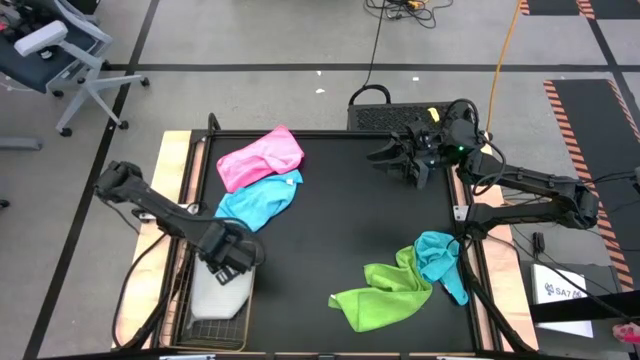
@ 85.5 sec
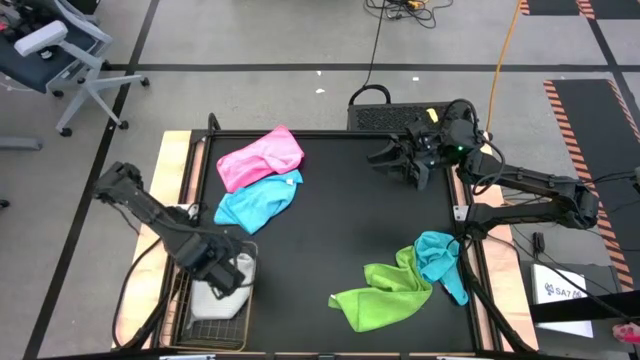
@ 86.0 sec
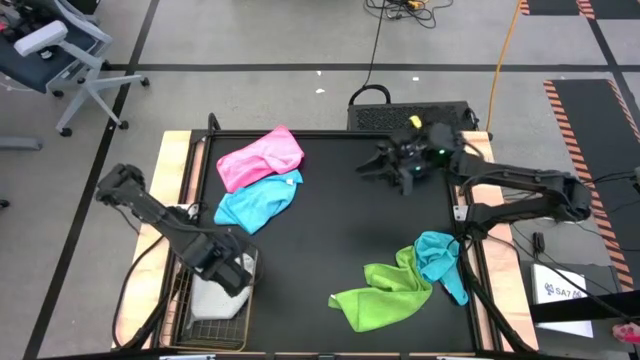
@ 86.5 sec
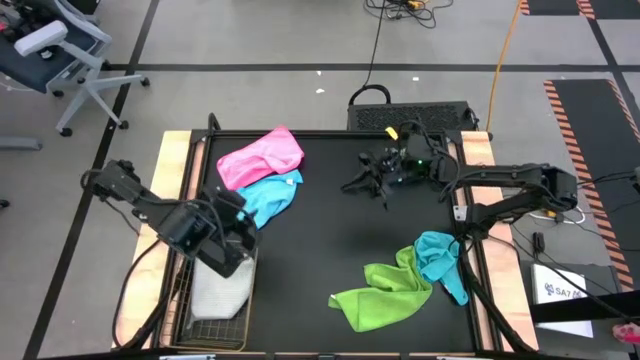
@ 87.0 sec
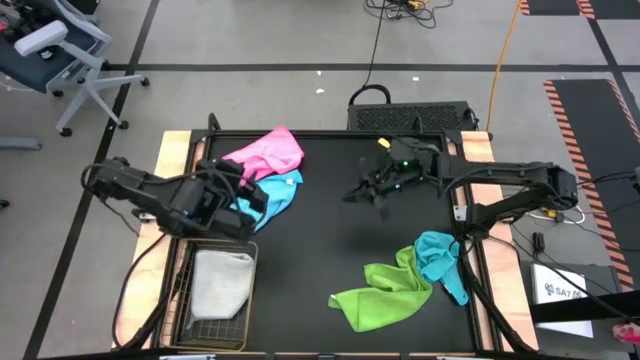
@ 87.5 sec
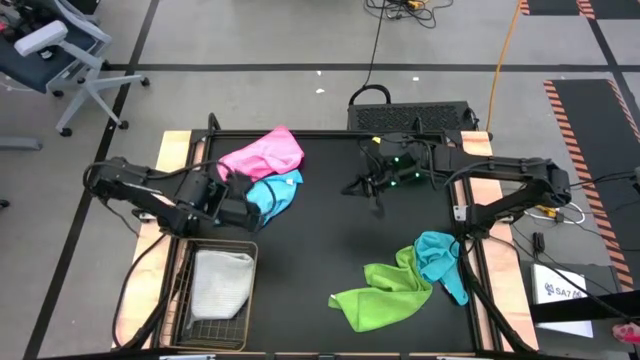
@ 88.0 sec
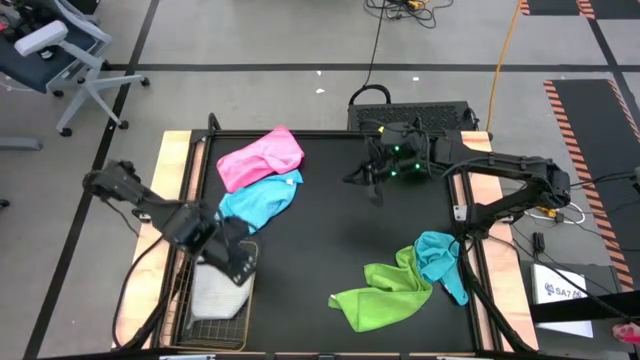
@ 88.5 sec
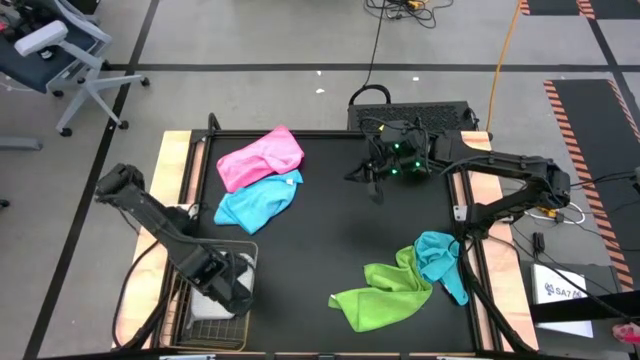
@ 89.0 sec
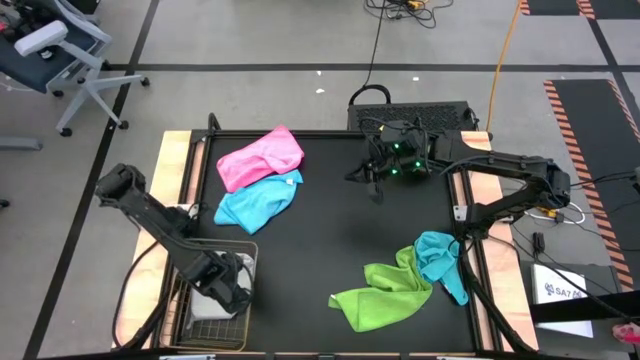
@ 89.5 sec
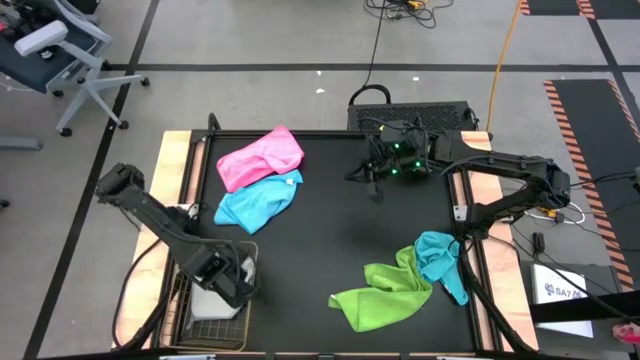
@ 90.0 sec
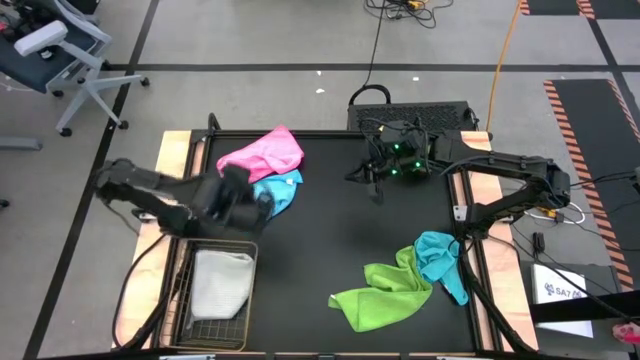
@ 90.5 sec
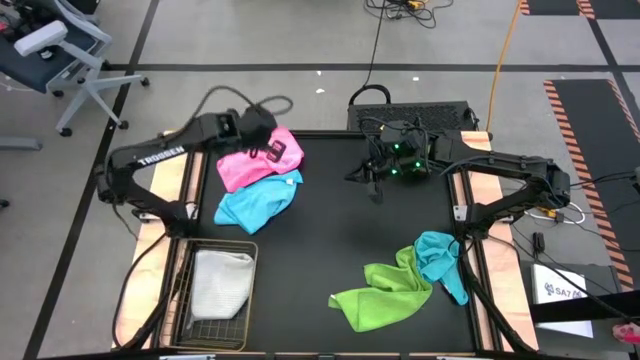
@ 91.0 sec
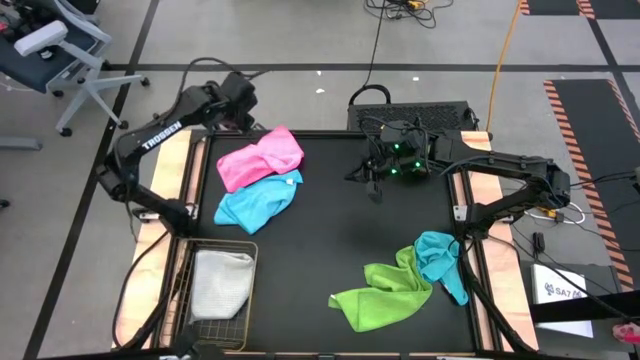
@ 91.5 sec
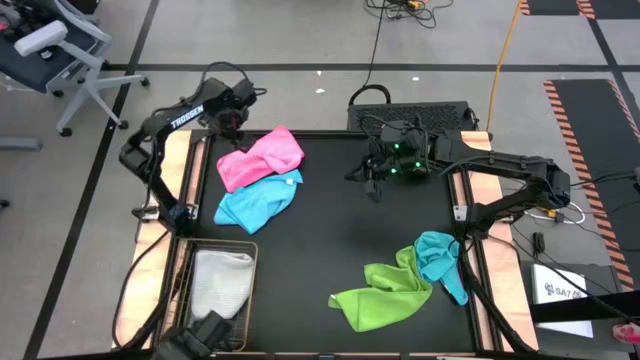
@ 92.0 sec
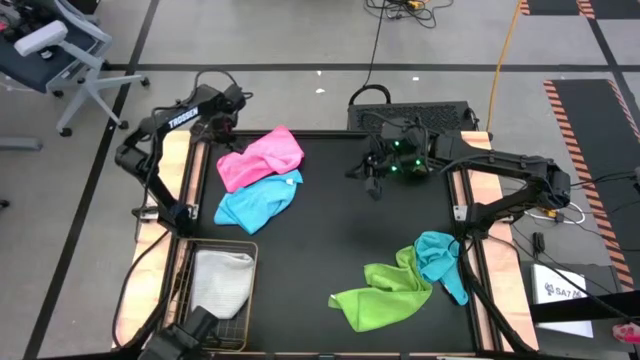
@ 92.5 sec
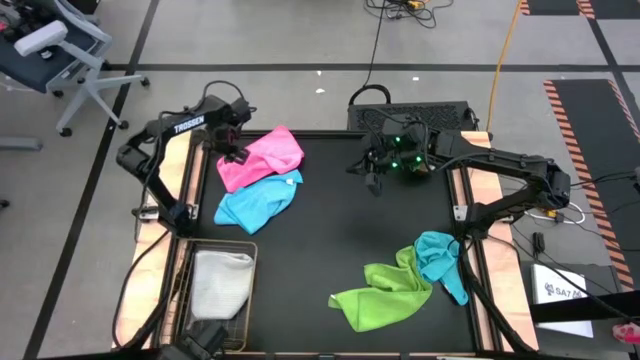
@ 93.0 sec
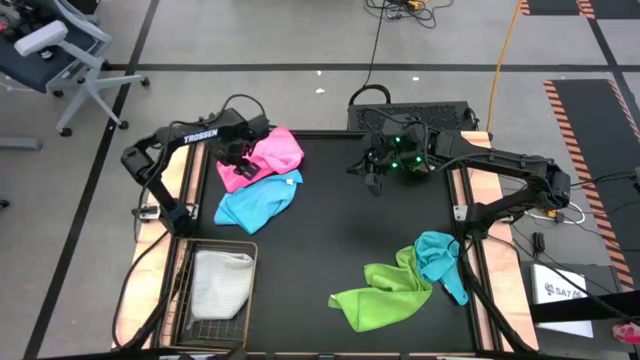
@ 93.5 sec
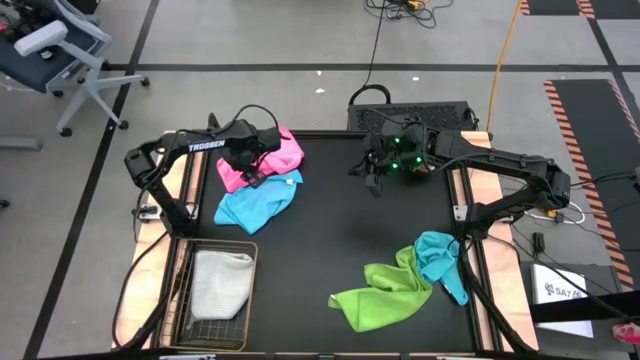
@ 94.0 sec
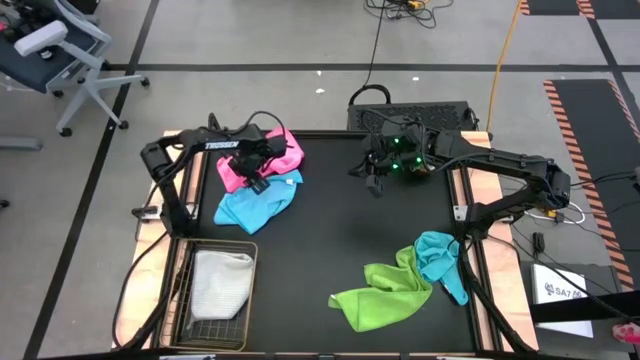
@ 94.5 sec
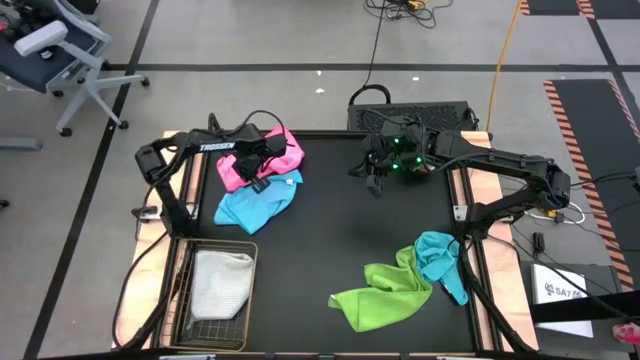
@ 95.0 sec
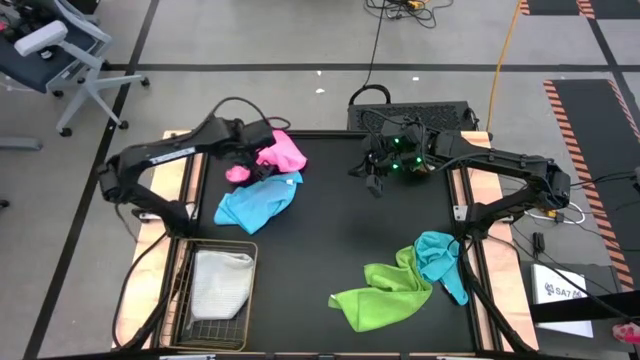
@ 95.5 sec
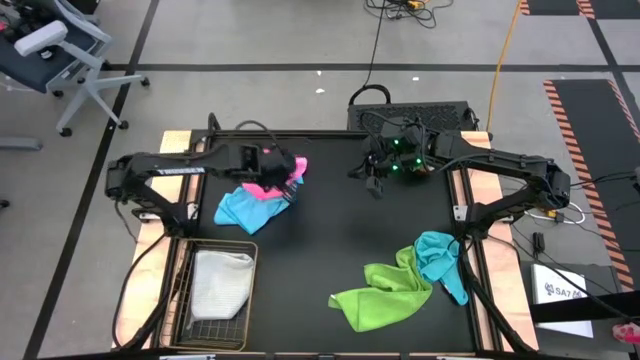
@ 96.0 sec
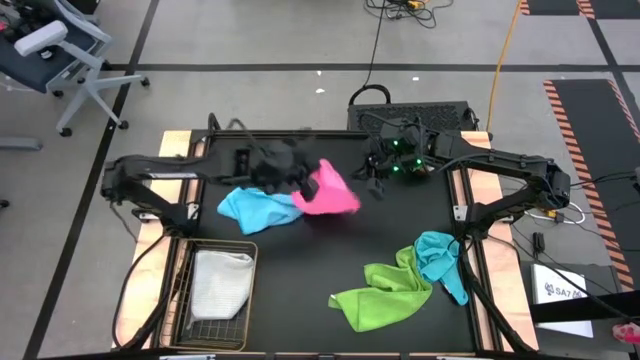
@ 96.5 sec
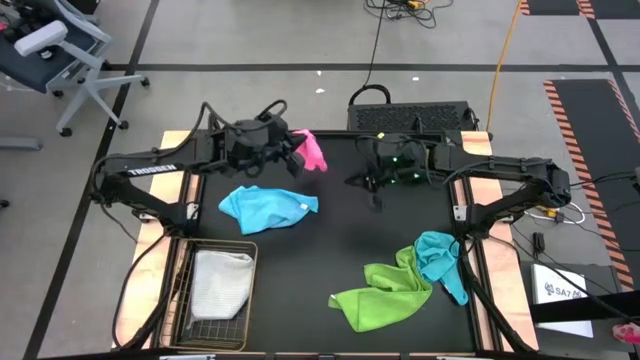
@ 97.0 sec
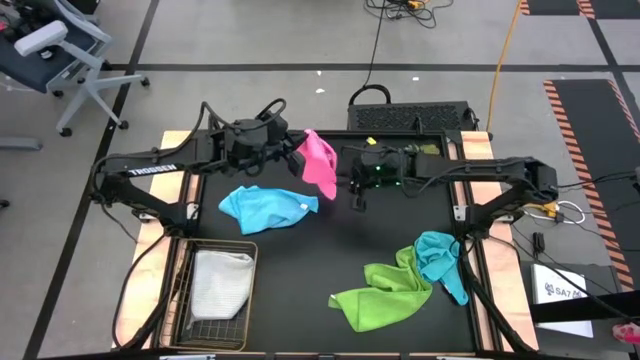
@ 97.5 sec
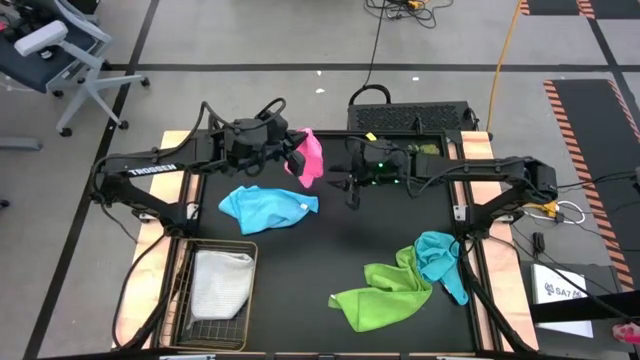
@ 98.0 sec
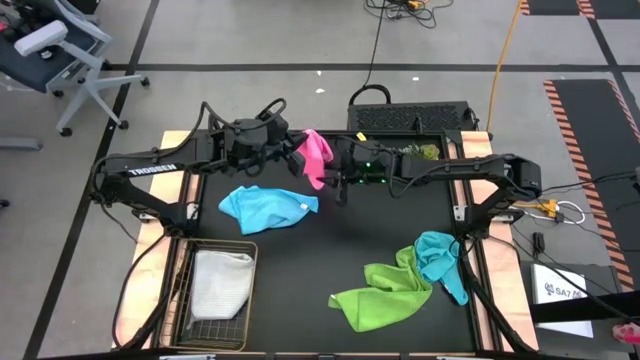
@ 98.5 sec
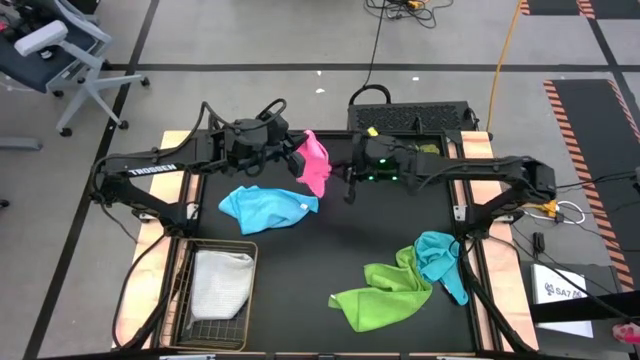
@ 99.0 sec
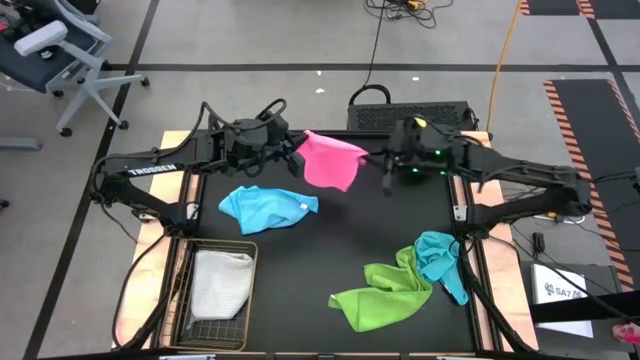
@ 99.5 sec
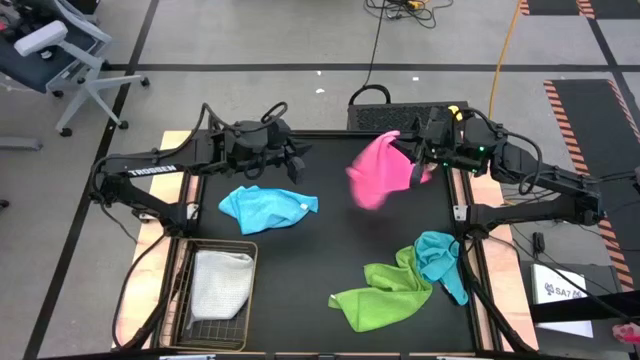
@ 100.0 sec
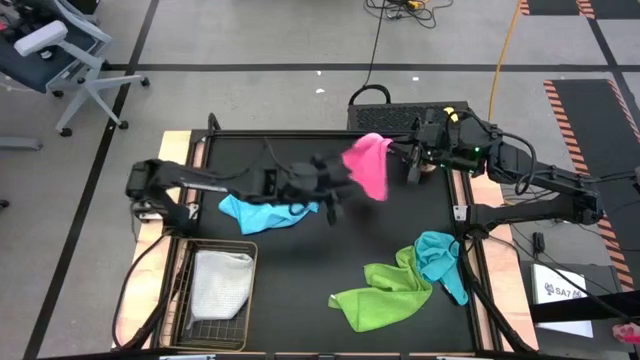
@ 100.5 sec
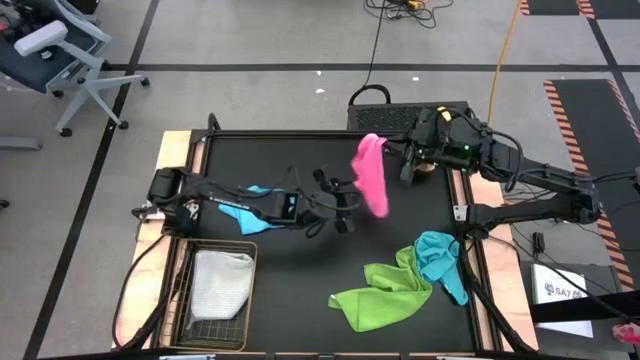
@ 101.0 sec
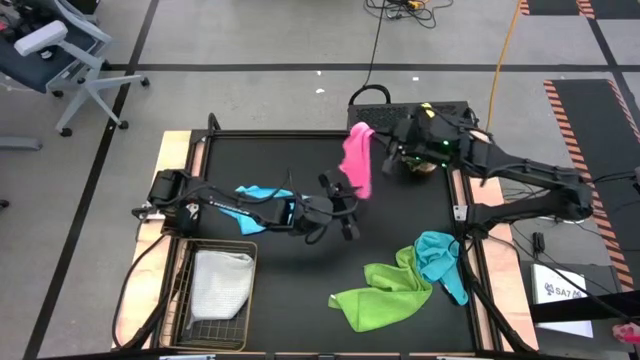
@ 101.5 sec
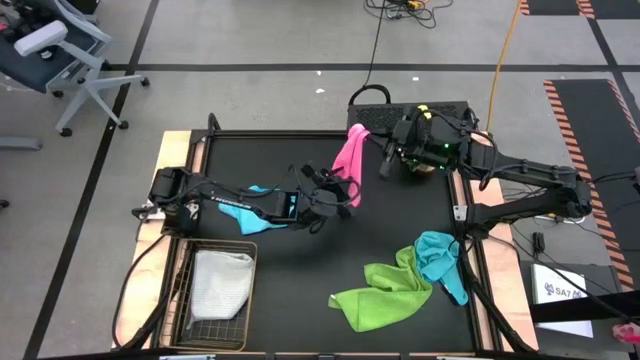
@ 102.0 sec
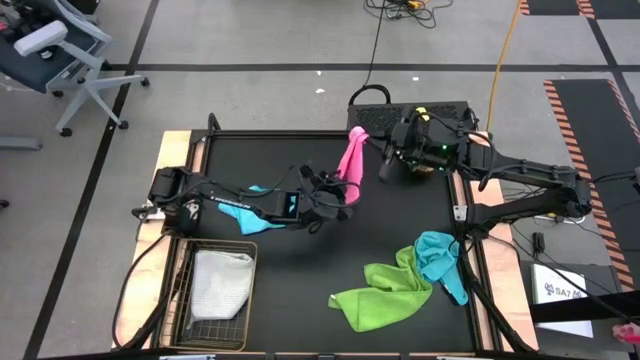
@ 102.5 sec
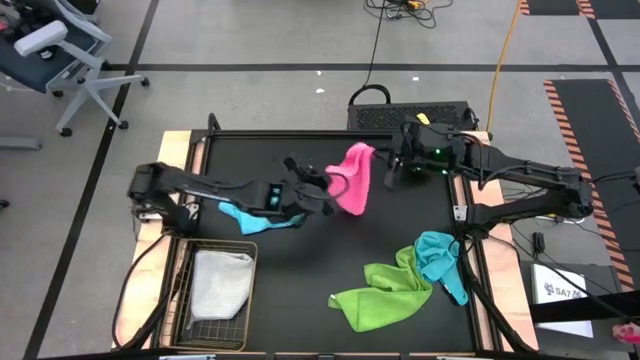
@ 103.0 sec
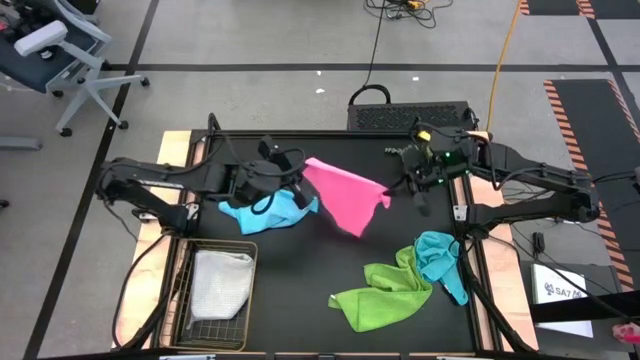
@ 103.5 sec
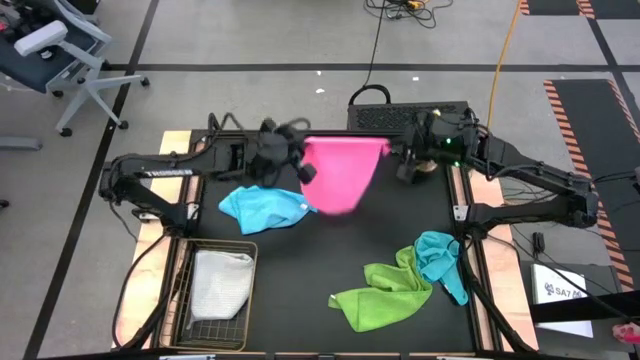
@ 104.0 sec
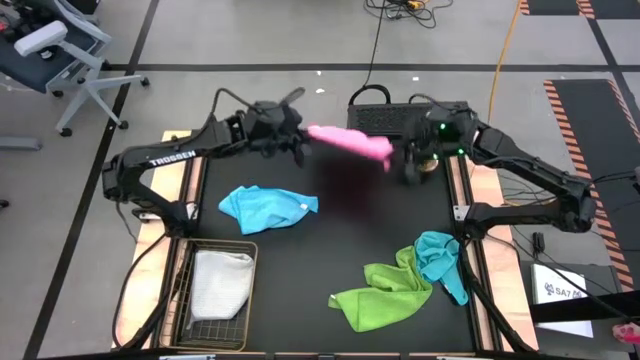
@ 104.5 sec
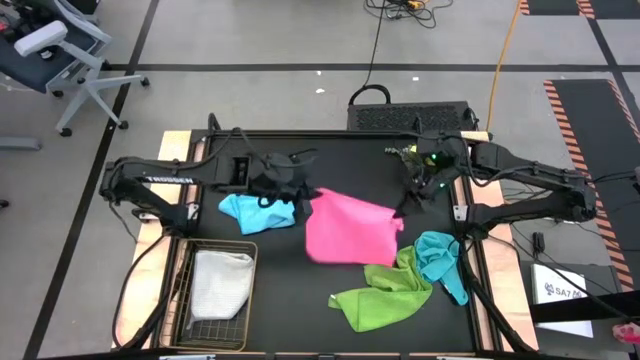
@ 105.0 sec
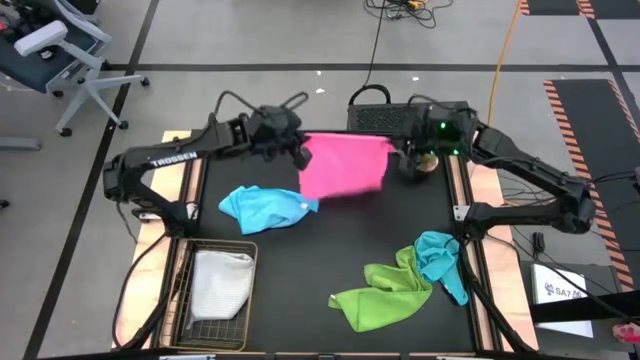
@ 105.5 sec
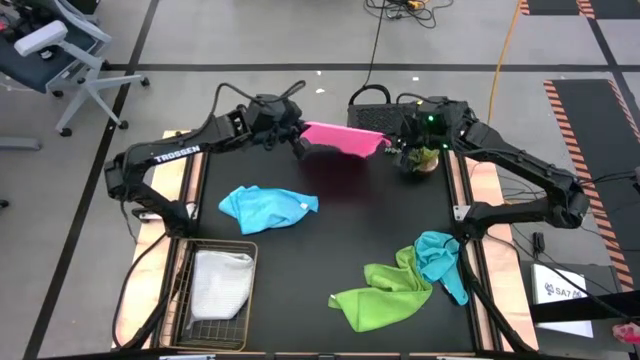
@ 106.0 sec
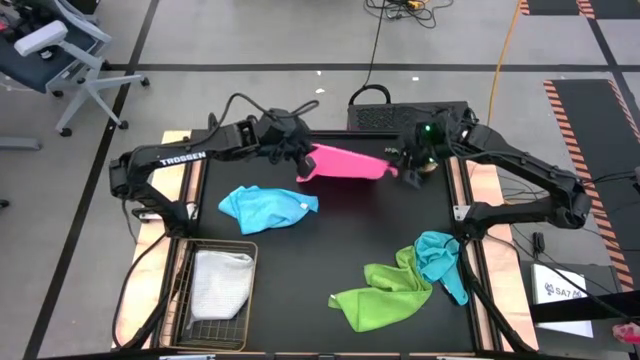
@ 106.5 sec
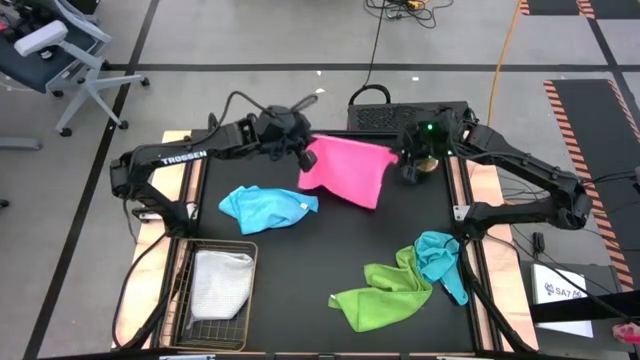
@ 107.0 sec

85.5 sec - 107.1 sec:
Task: Fold microfiber towels
Fold the pink microfiber cloth
